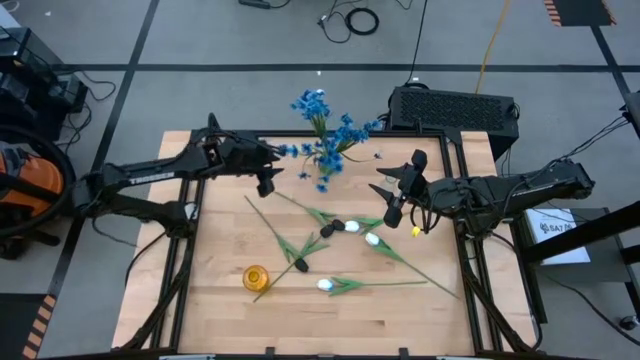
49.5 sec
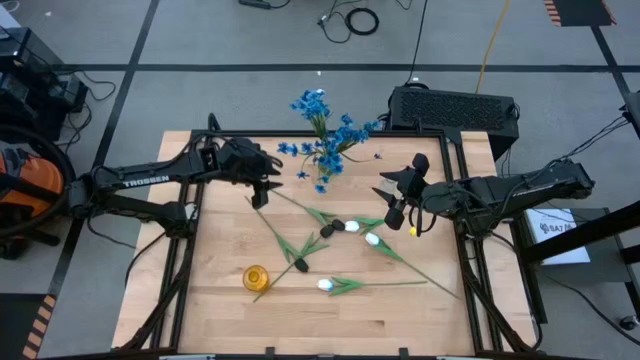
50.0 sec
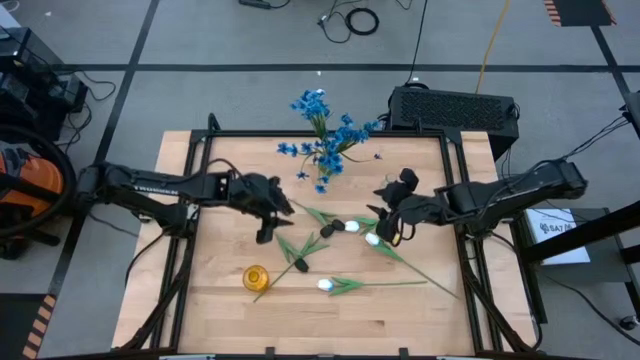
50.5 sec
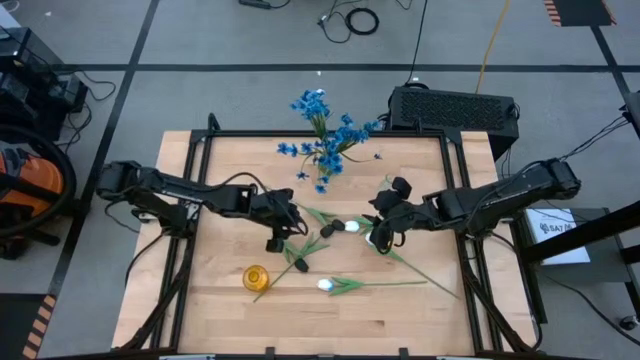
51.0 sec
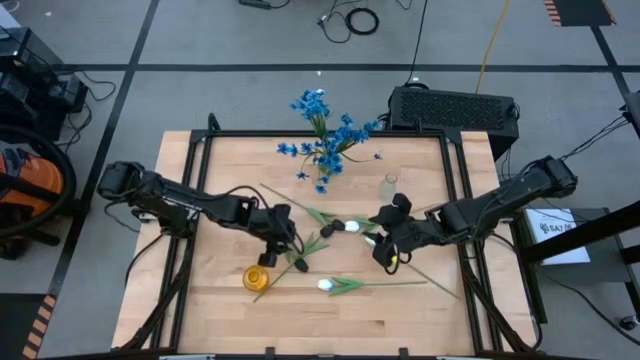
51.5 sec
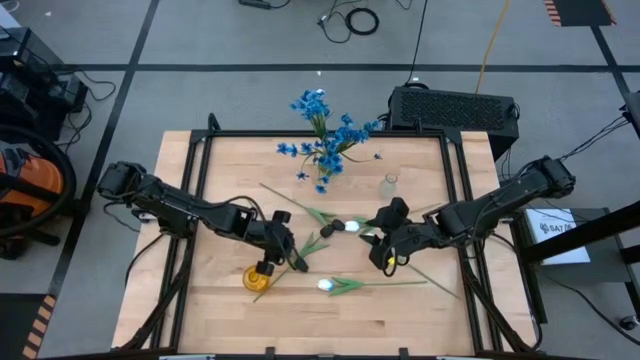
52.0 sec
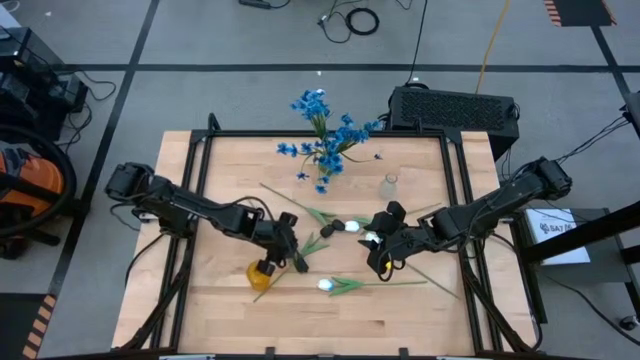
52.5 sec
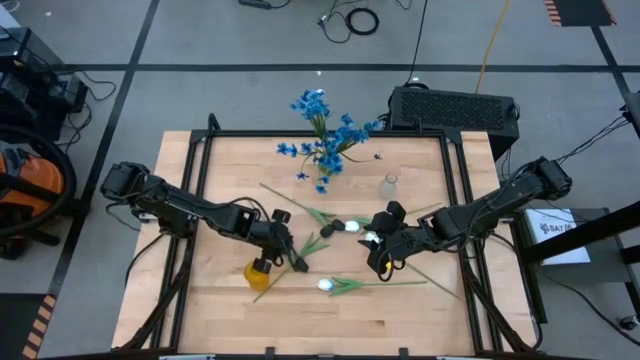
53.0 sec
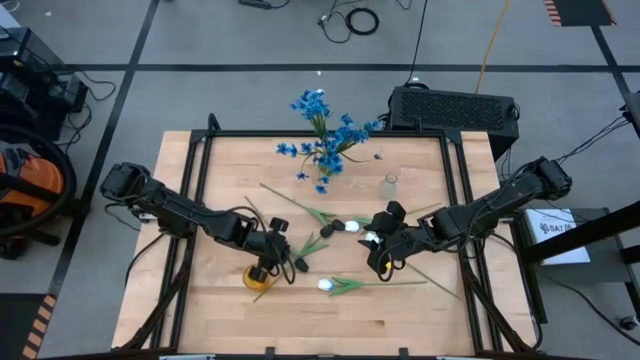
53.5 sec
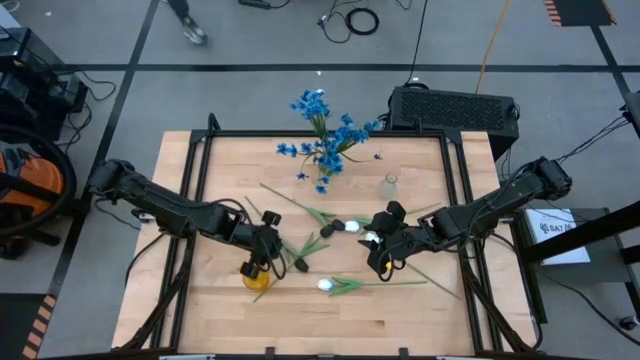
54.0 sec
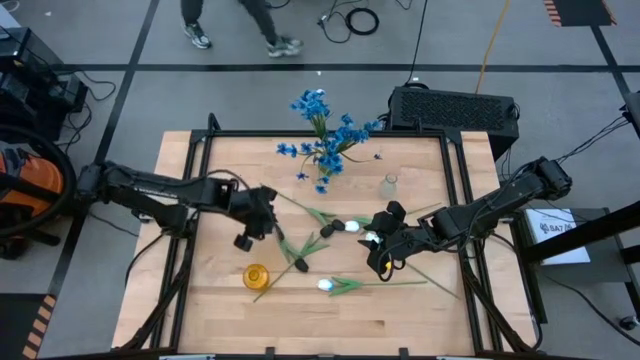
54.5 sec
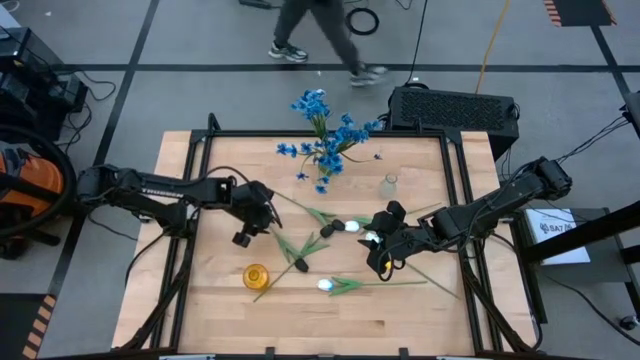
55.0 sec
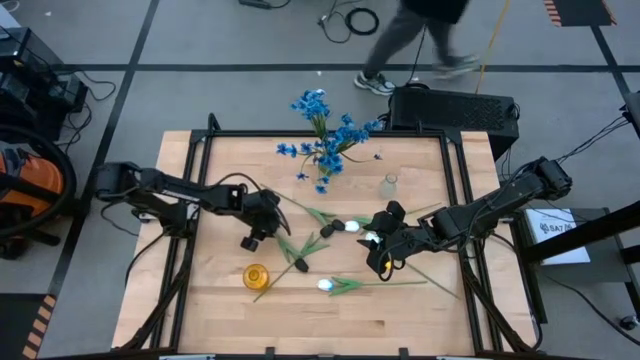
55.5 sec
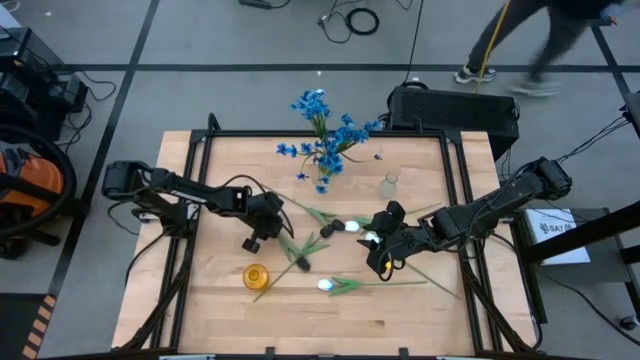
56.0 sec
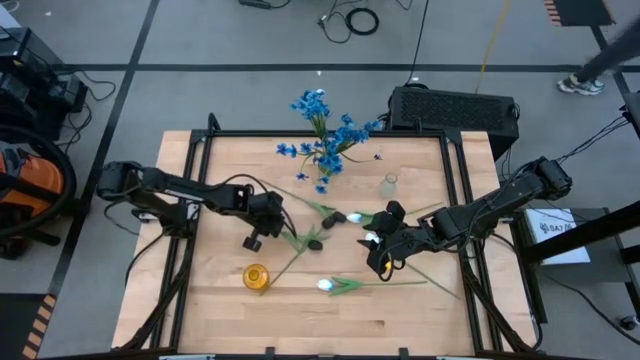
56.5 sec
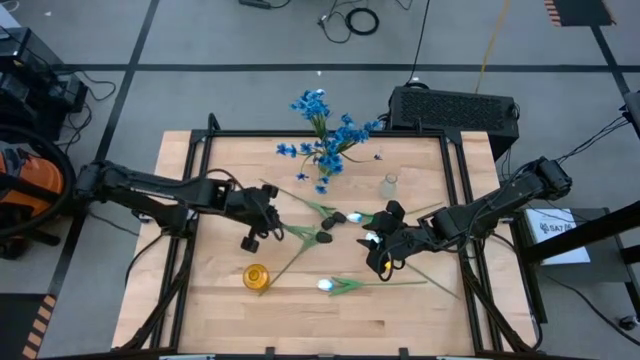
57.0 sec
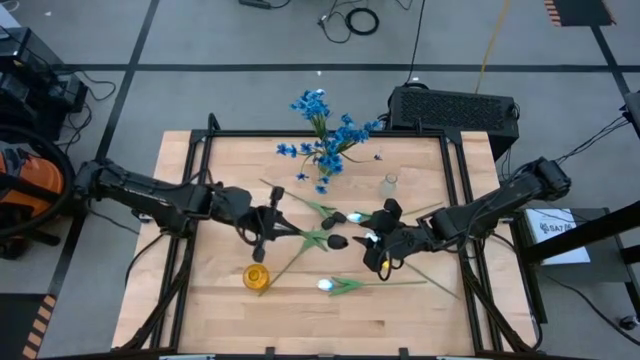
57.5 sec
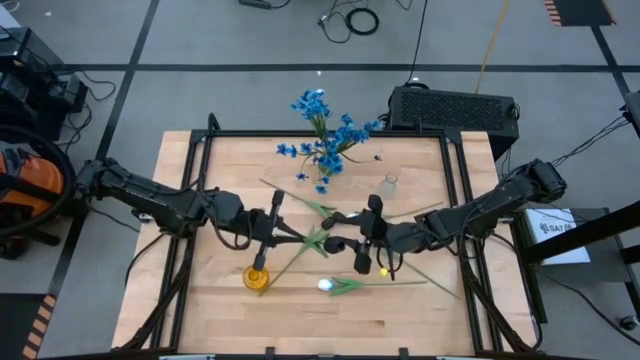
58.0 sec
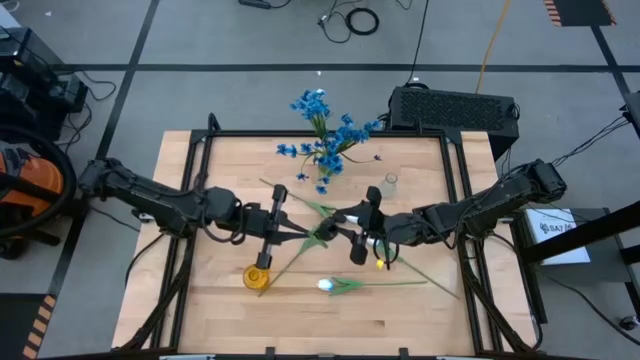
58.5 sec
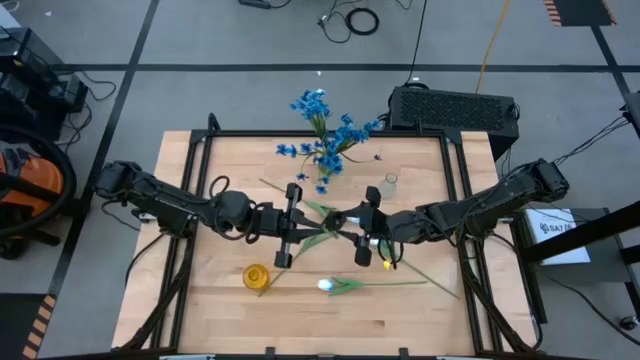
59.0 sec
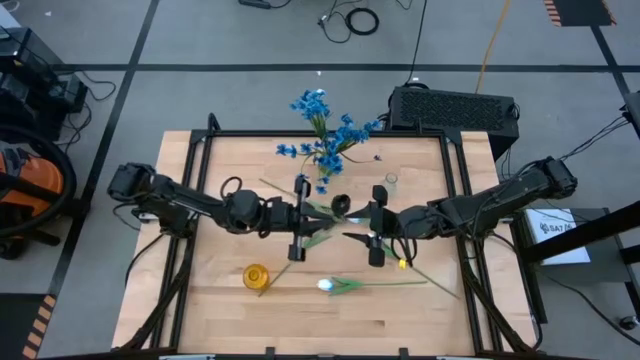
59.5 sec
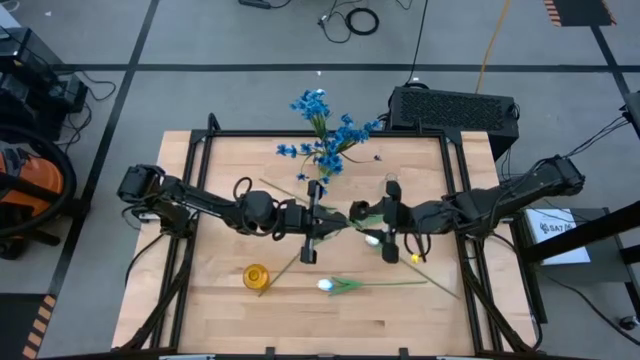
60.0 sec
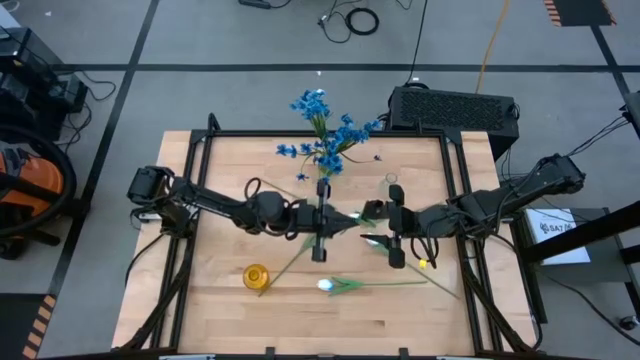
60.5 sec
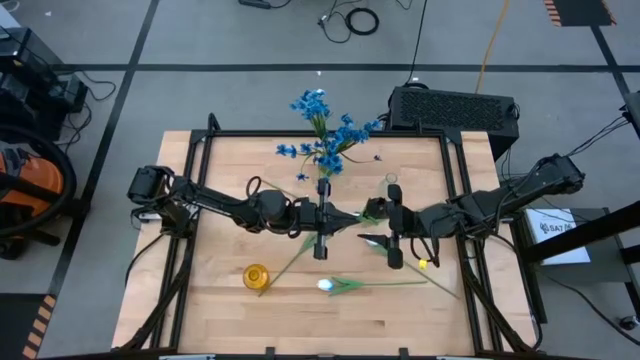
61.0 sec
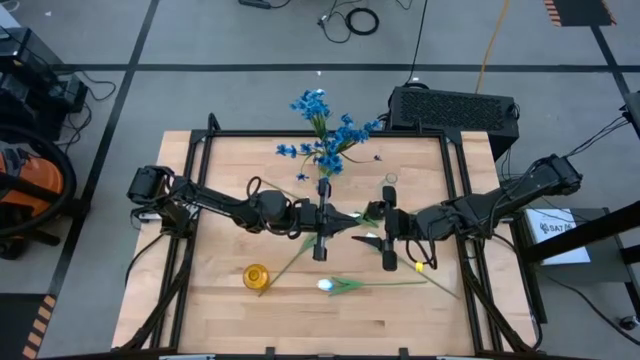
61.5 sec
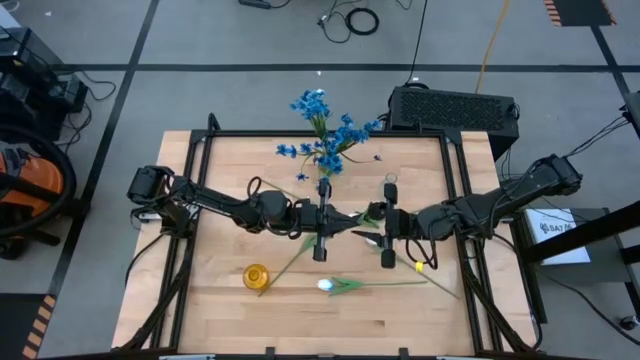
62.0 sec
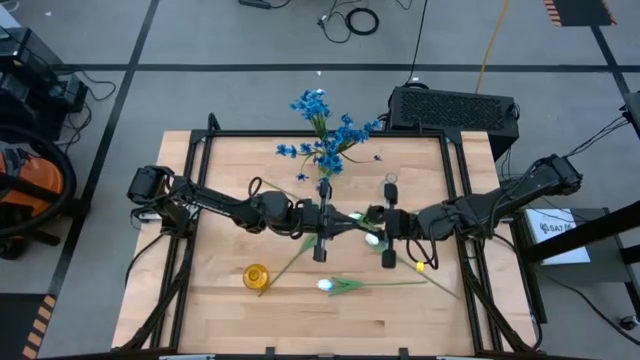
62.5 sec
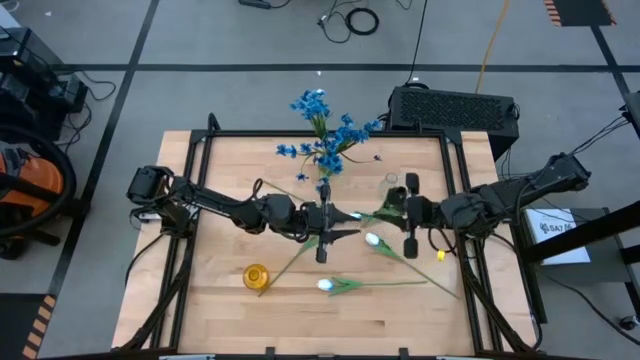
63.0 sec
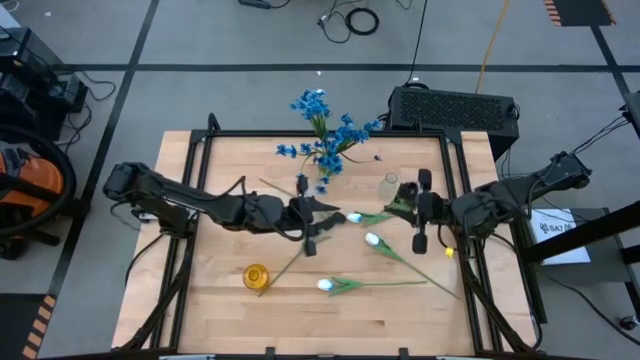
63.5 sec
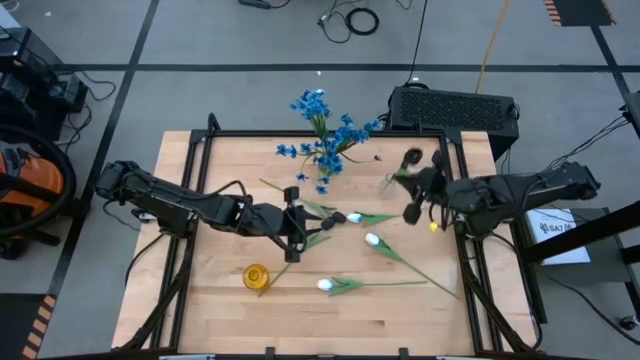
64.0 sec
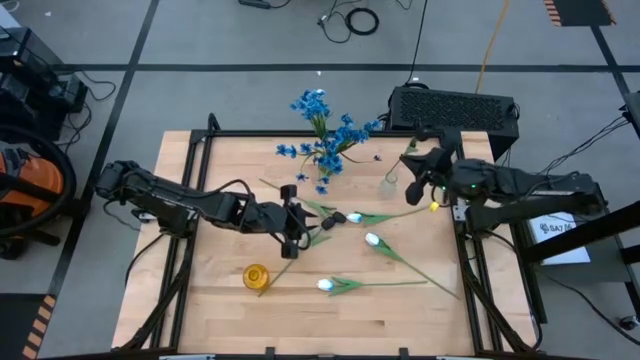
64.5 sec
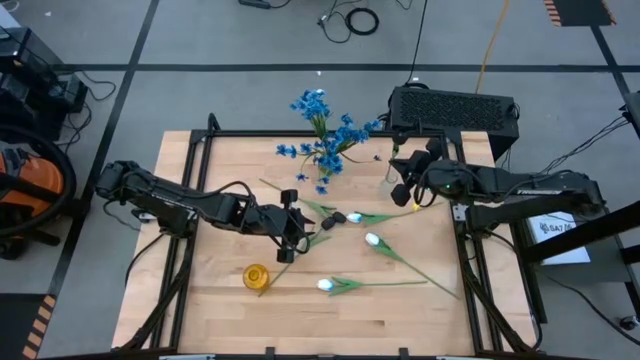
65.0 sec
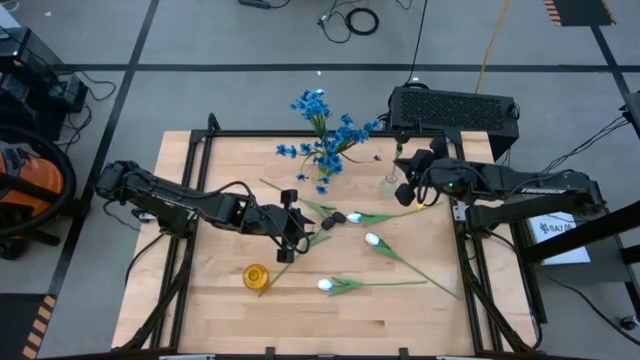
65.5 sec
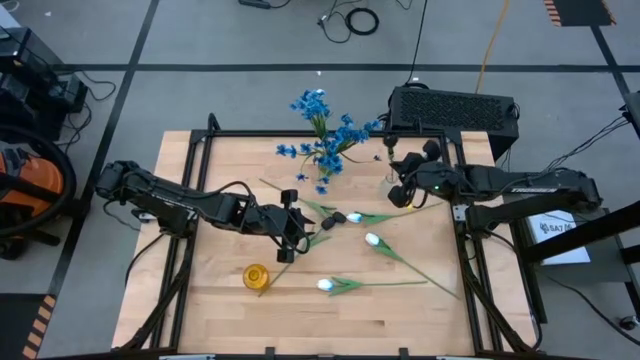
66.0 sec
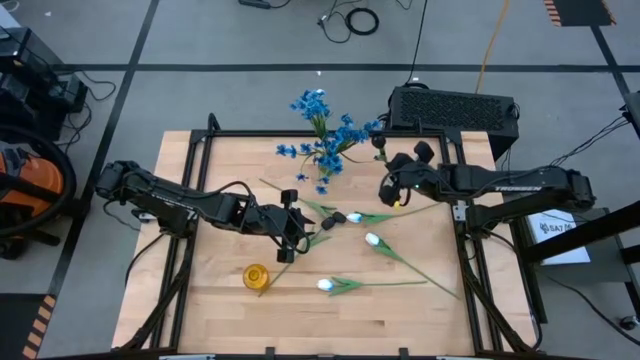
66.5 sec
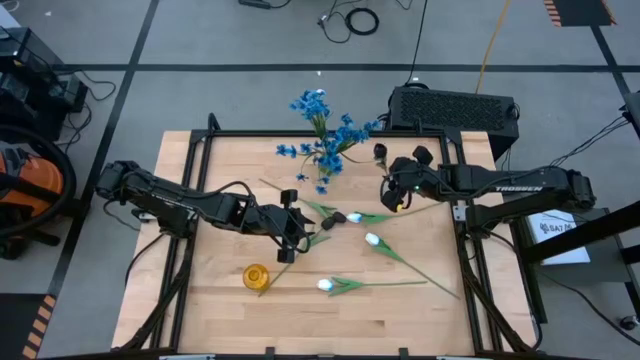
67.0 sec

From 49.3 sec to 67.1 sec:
Task: Sort flowers into vase by color
Put the bottom black tulip into the transparent vase

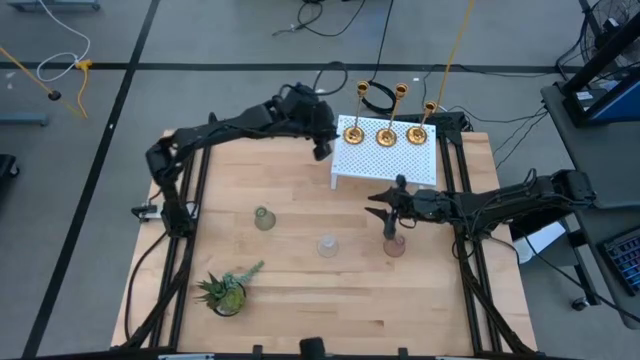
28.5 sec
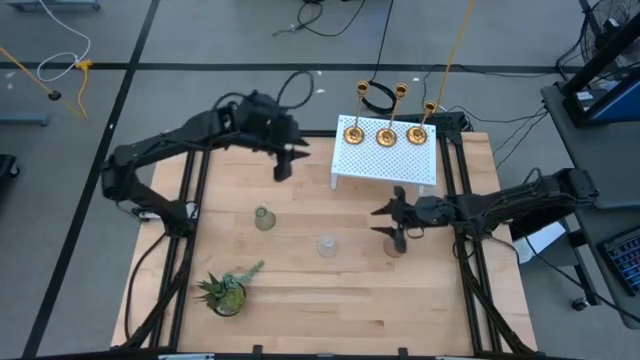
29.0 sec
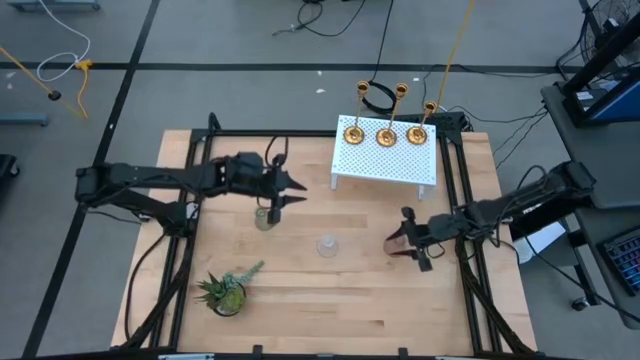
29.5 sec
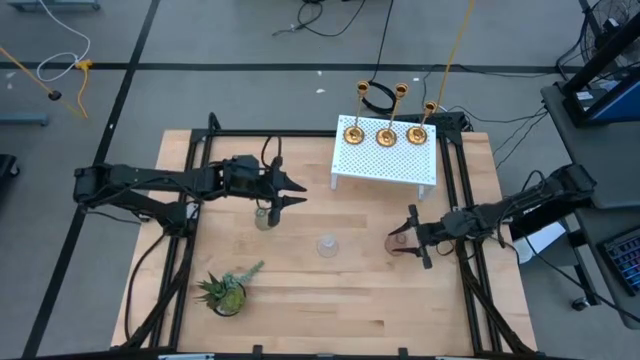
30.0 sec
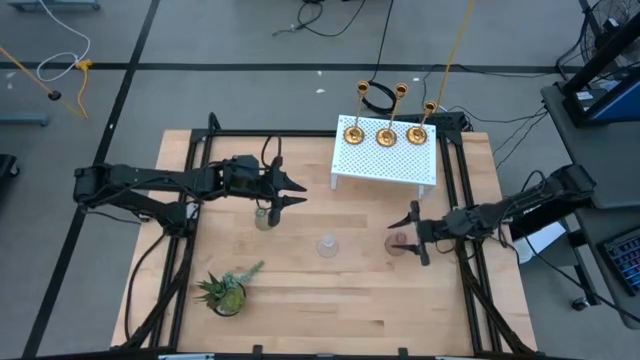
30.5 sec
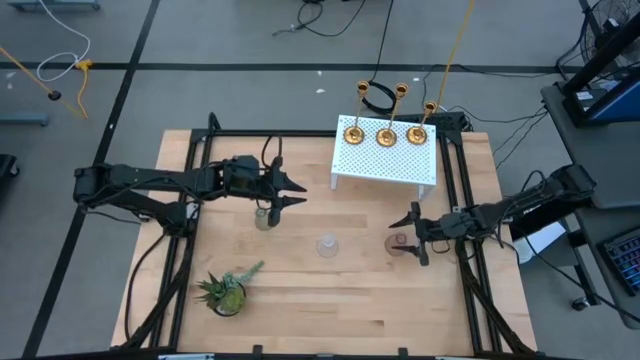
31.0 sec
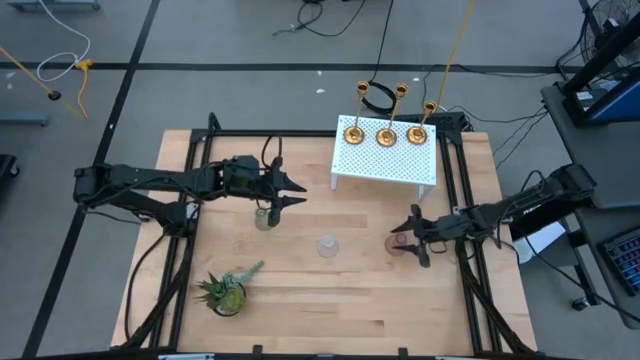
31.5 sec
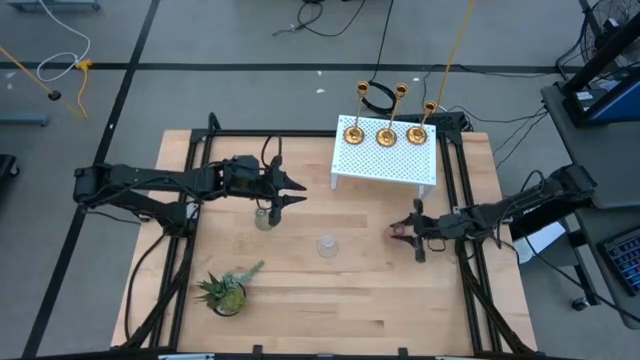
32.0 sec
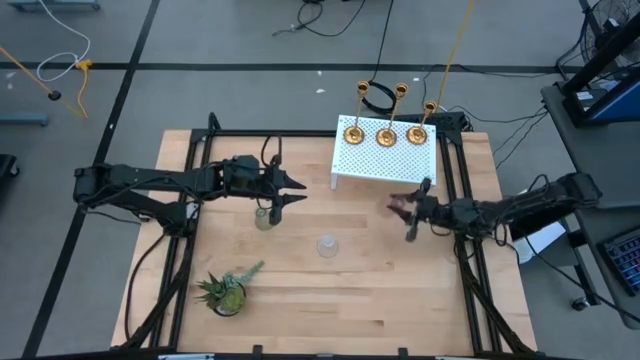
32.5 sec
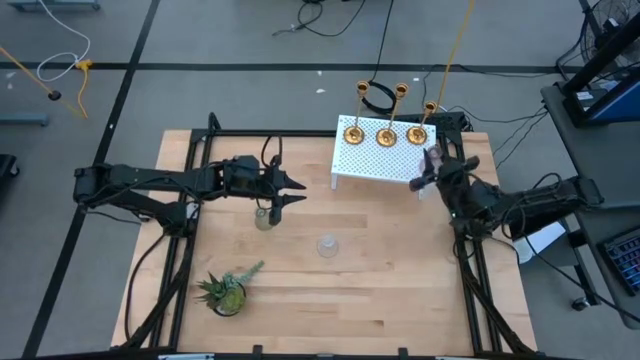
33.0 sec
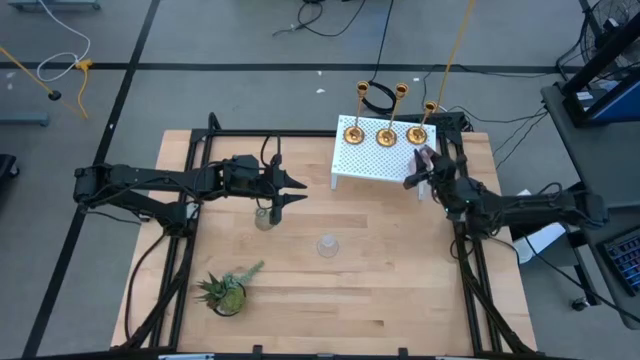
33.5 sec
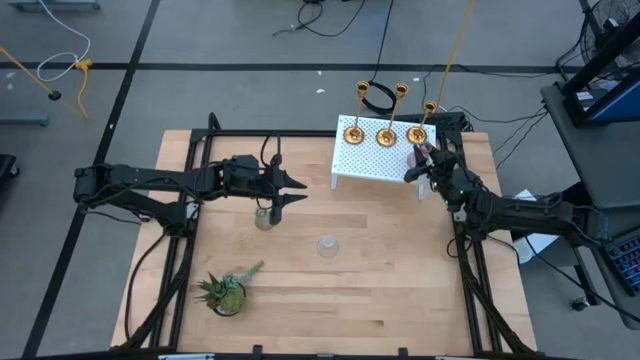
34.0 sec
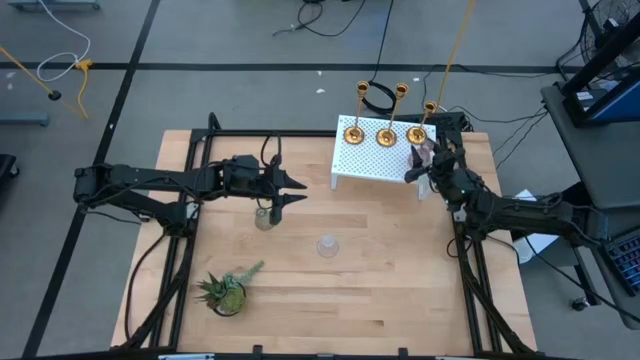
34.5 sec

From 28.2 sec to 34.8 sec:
Task: Pick & Place candle stick holders
Put the purple glass candle holder on the shelf
